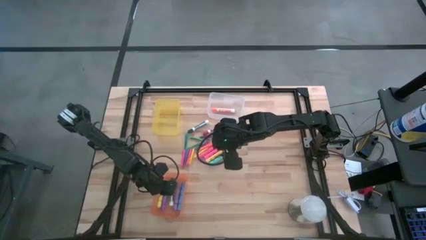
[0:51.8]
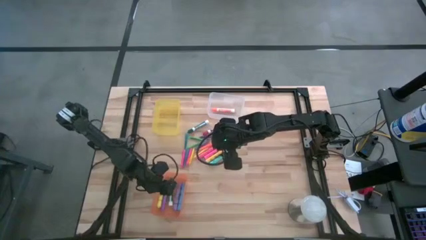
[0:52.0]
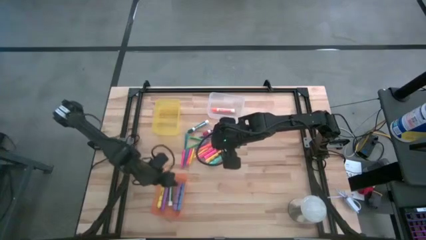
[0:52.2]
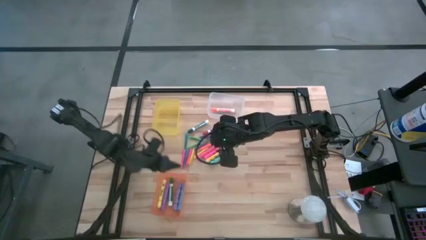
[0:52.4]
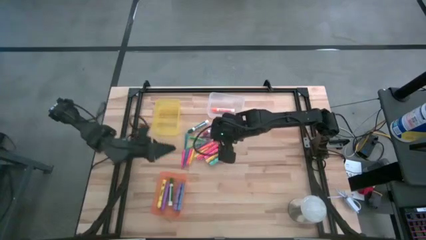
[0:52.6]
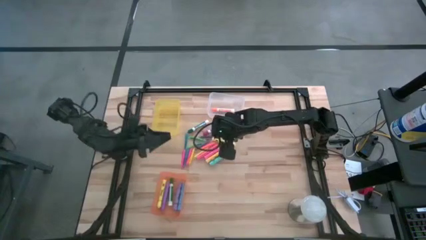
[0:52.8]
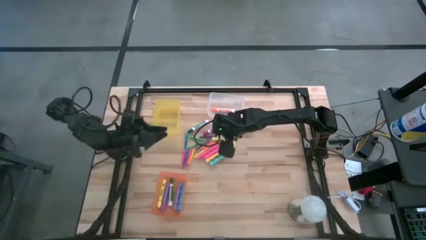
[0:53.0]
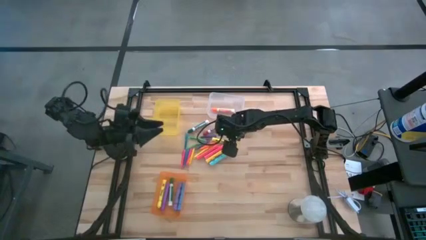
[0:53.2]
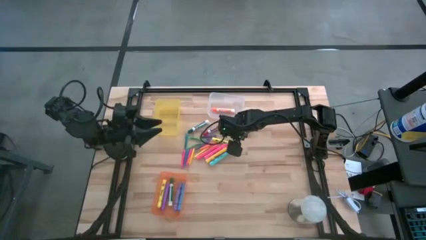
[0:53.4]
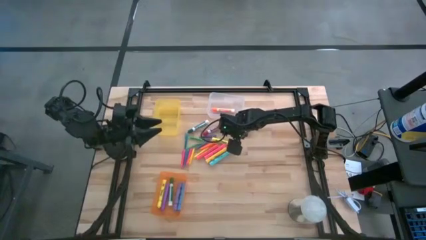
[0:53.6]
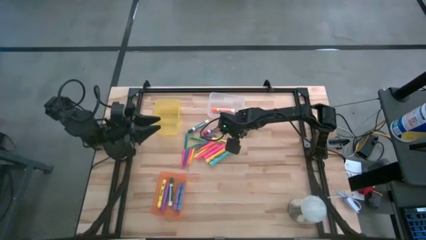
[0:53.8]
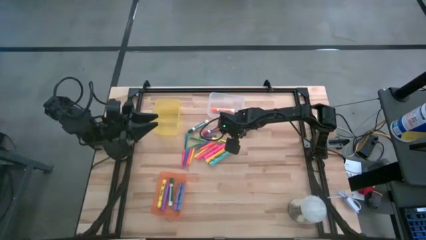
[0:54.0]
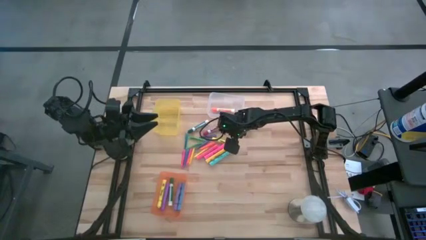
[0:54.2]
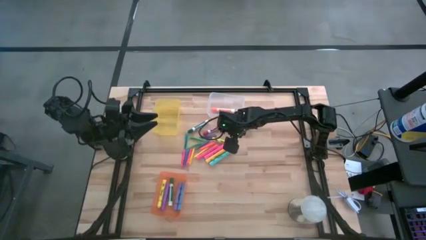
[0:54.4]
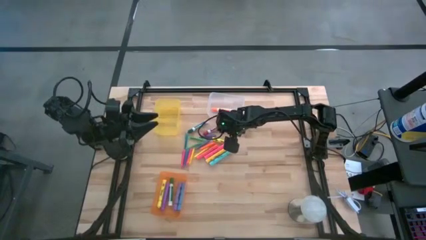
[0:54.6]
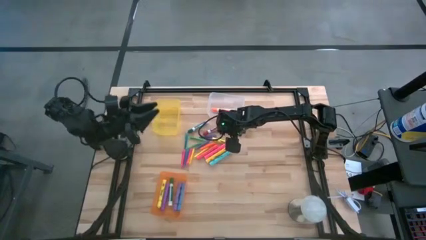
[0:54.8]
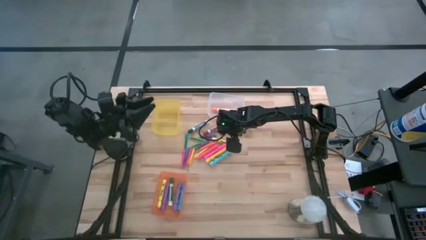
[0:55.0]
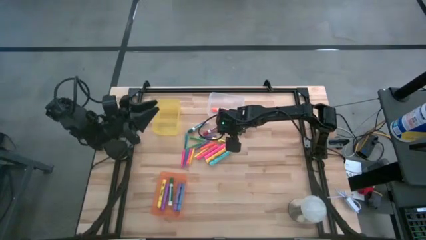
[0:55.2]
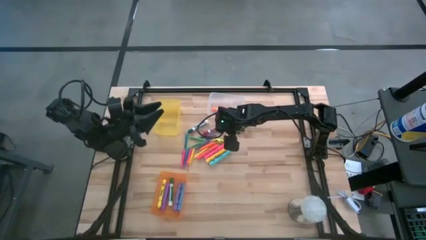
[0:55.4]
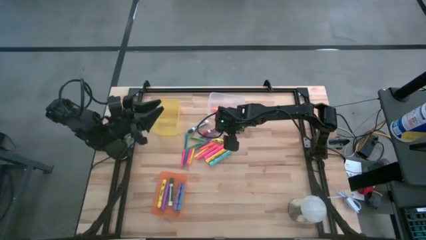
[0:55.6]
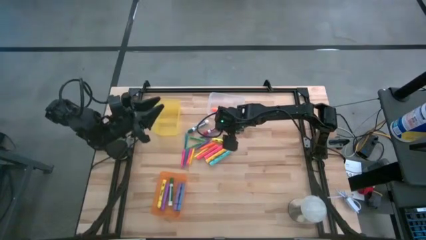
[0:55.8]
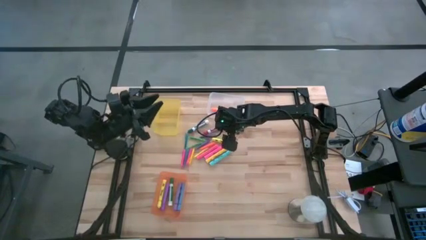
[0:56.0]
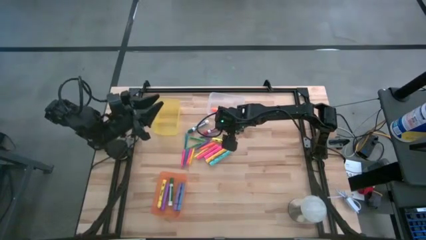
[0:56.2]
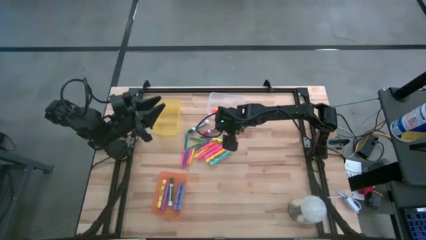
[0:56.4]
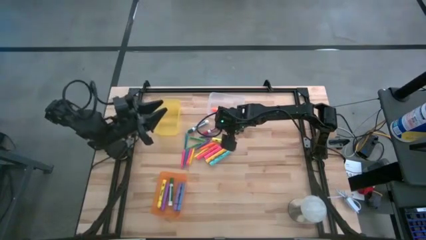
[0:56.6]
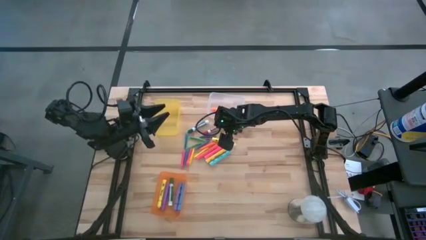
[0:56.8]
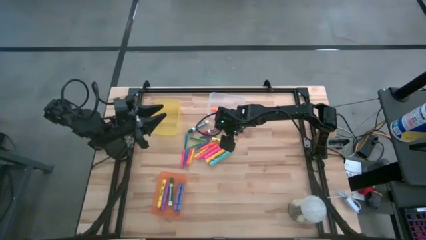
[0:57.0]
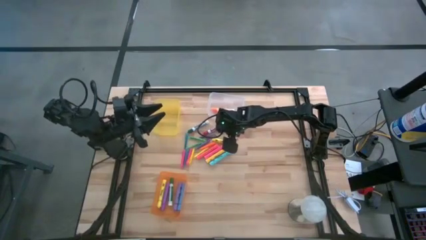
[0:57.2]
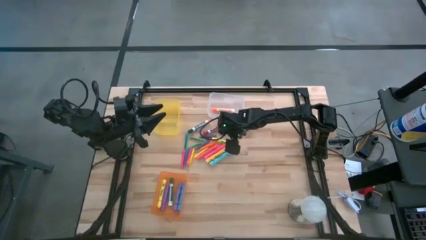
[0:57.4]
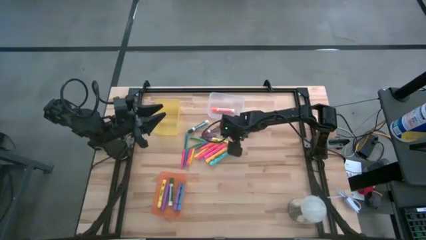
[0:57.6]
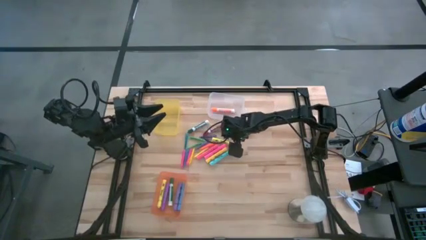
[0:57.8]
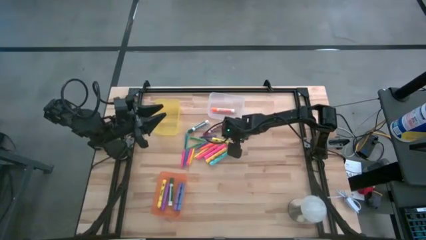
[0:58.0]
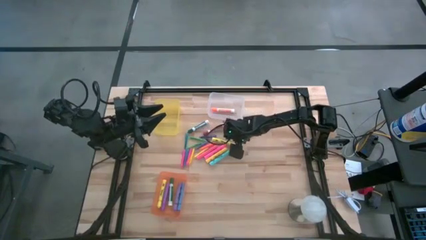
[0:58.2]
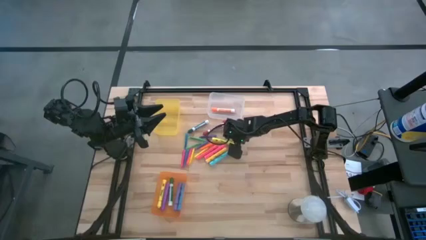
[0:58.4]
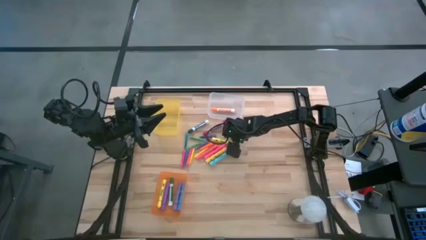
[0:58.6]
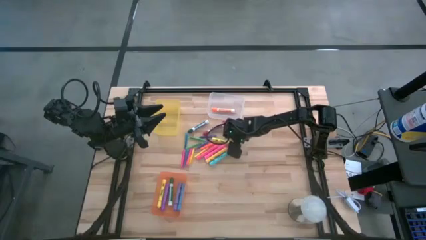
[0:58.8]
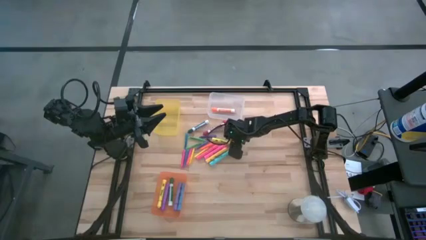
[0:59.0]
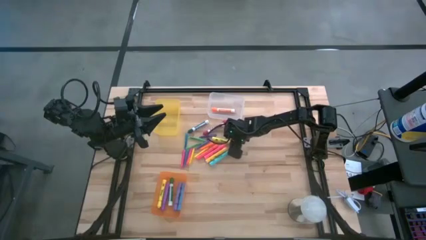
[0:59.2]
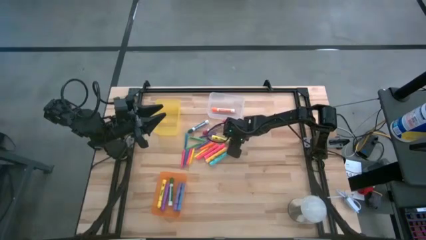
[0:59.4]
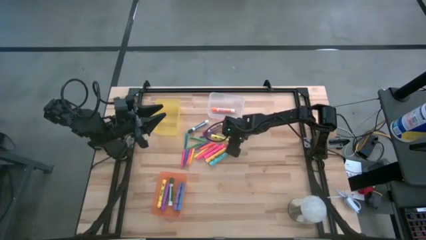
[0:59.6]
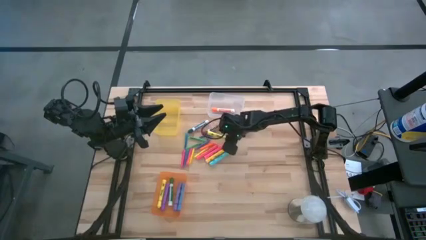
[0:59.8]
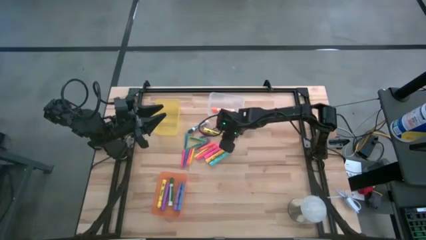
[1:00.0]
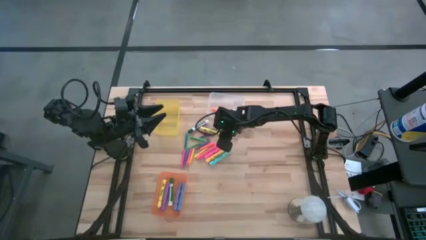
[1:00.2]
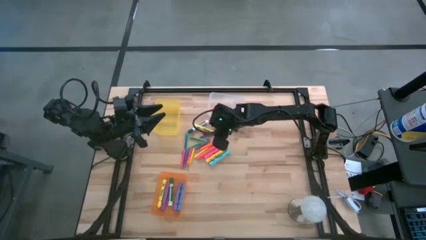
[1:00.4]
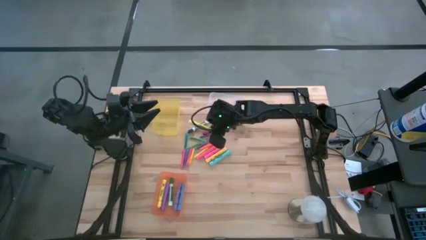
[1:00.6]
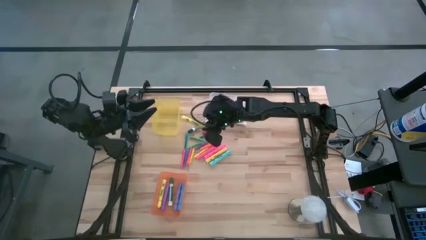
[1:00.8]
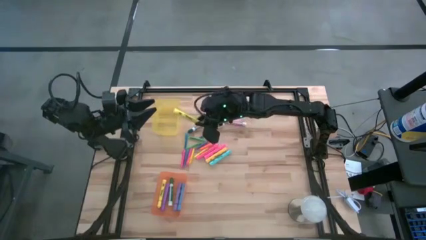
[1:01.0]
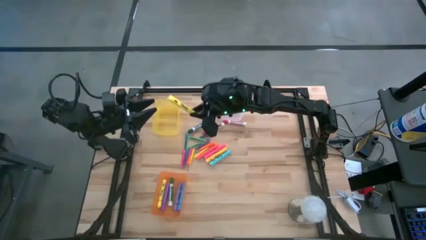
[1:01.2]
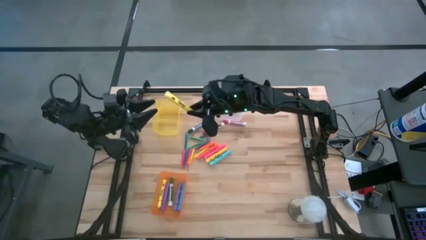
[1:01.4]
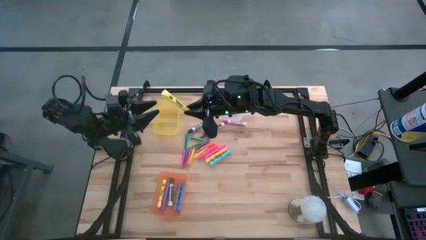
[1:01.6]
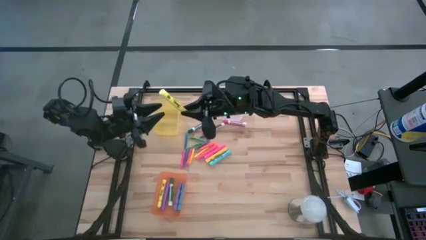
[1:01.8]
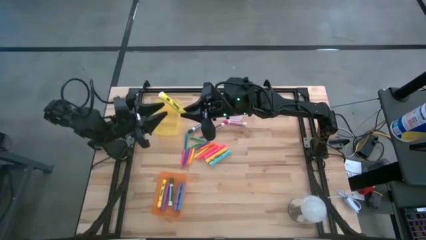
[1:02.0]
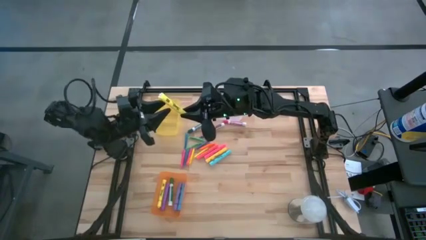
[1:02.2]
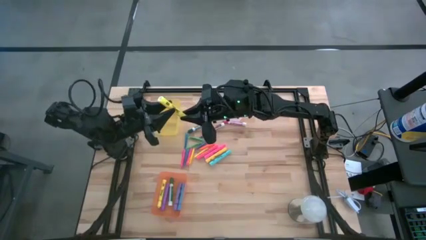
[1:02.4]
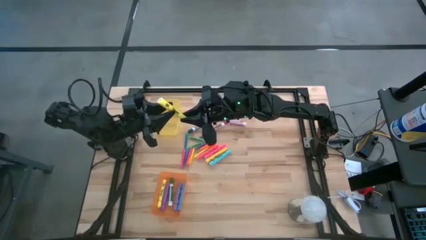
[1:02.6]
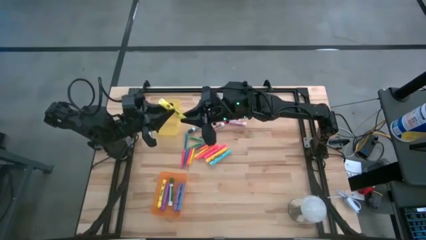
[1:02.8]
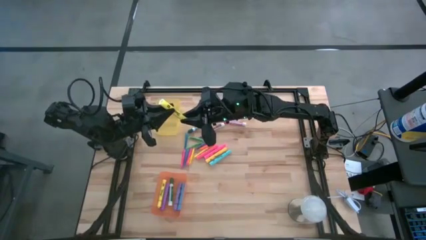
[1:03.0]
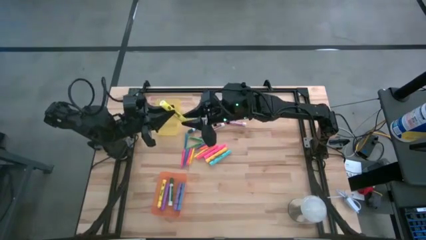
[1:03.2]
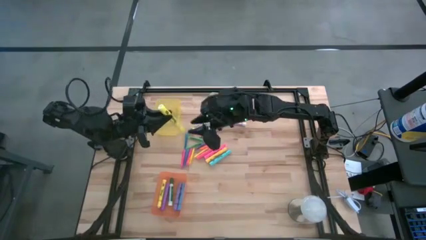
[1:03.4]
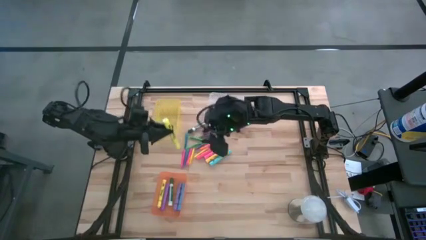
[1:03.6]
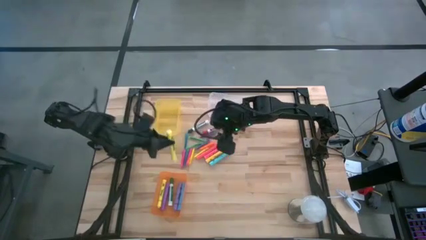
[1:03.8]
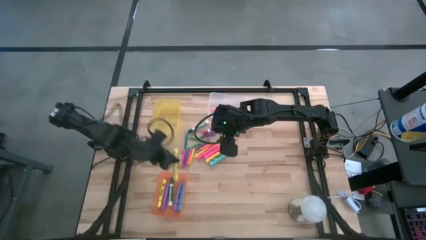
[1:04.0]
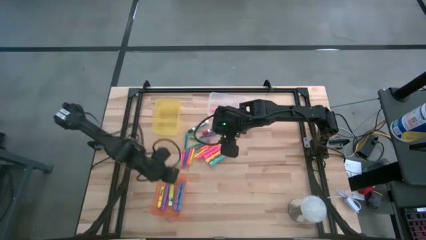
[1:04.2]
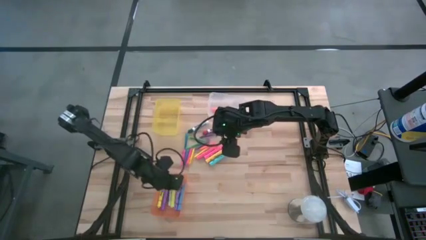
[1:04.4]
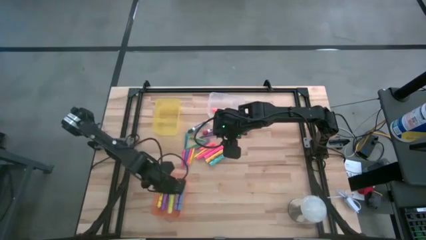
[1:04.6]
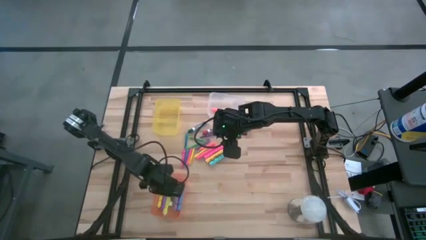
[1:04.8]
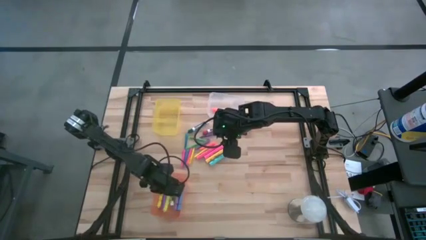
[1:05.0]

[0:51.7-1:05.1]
Task: Pick & Place Markers
Put the yellow highlighter into the orange bin
